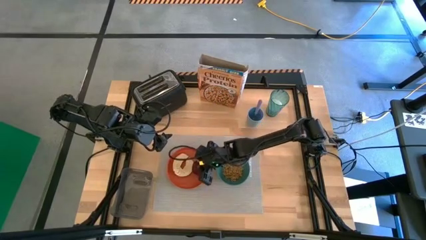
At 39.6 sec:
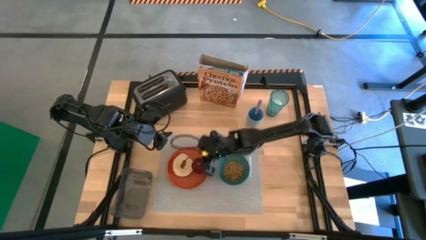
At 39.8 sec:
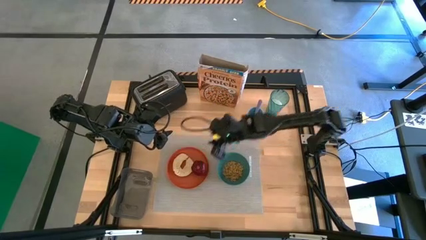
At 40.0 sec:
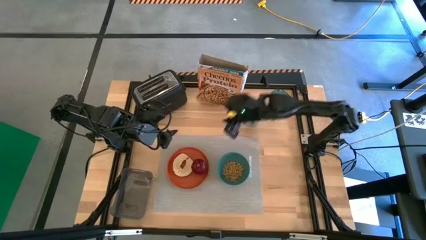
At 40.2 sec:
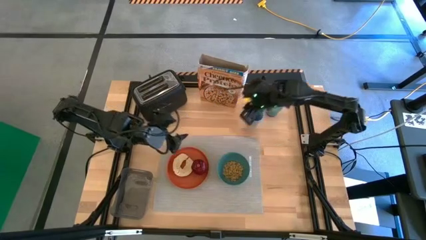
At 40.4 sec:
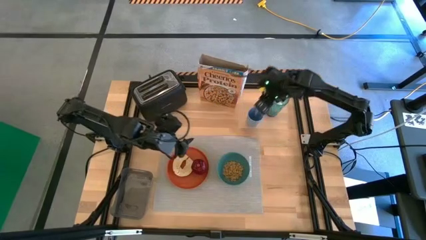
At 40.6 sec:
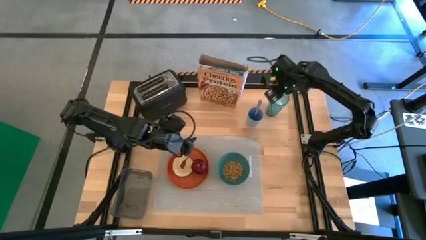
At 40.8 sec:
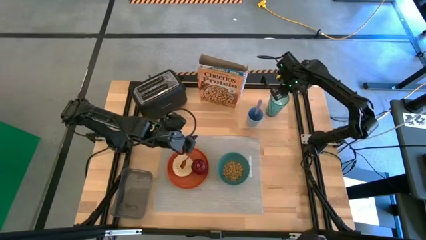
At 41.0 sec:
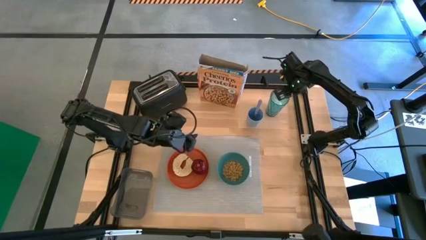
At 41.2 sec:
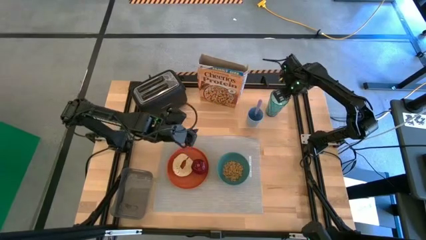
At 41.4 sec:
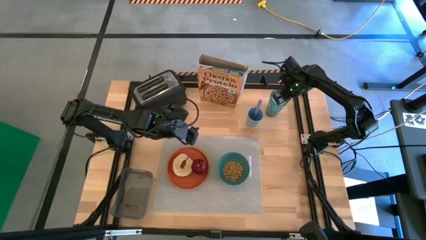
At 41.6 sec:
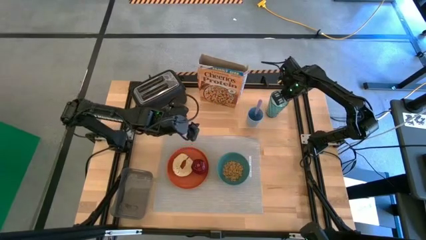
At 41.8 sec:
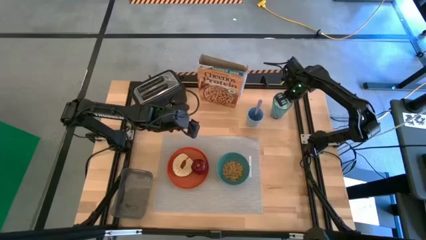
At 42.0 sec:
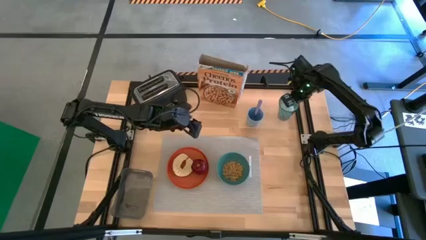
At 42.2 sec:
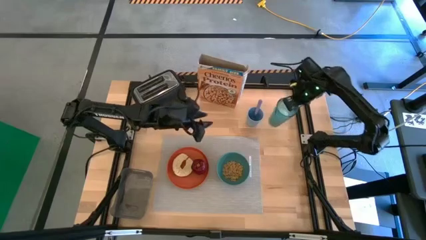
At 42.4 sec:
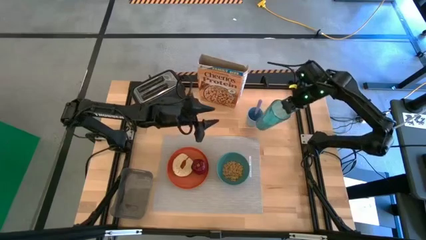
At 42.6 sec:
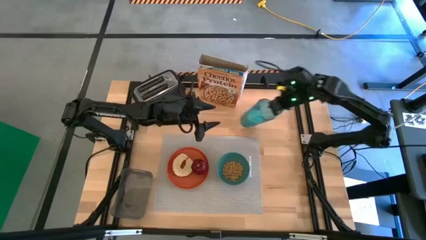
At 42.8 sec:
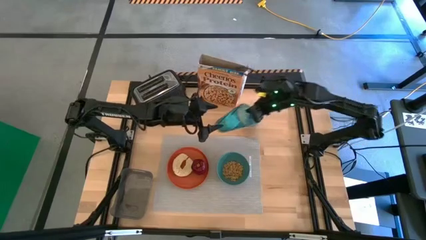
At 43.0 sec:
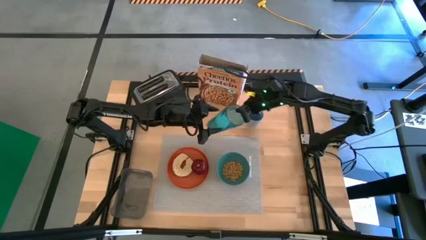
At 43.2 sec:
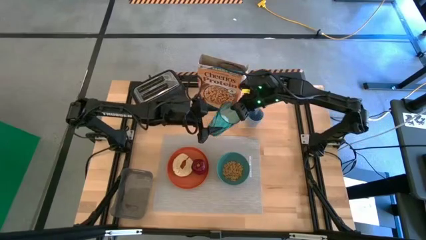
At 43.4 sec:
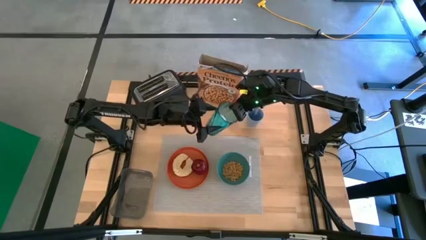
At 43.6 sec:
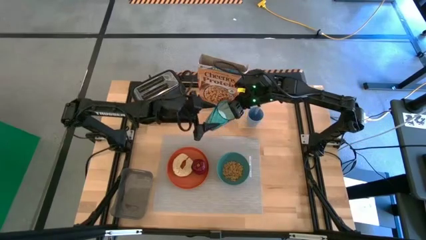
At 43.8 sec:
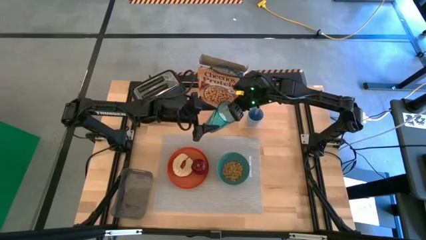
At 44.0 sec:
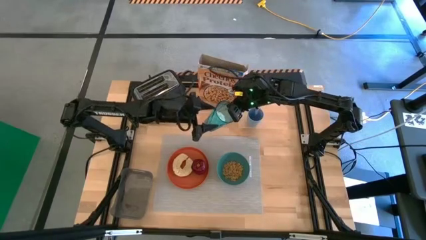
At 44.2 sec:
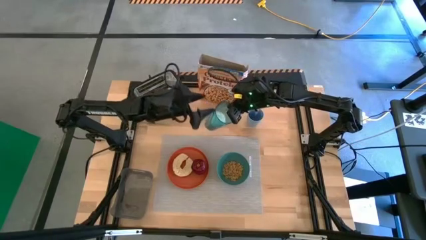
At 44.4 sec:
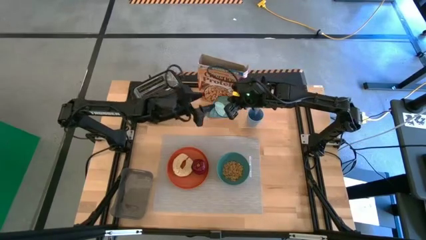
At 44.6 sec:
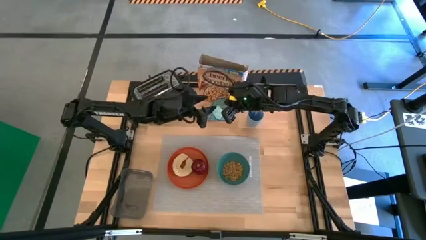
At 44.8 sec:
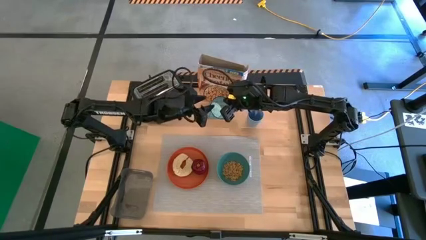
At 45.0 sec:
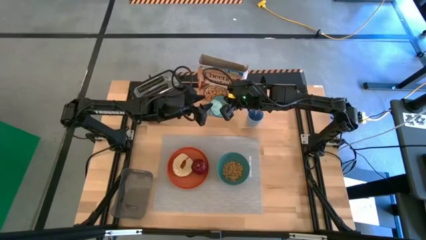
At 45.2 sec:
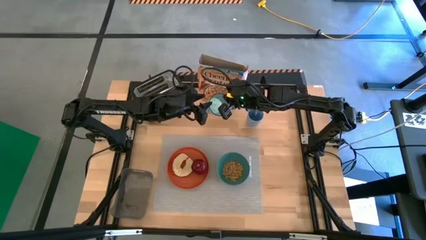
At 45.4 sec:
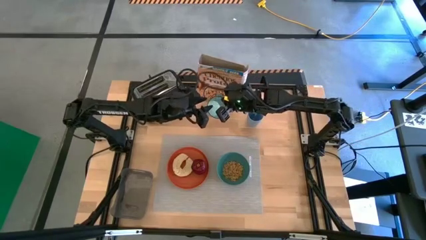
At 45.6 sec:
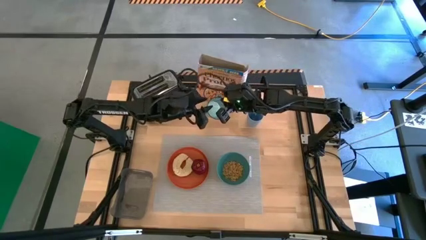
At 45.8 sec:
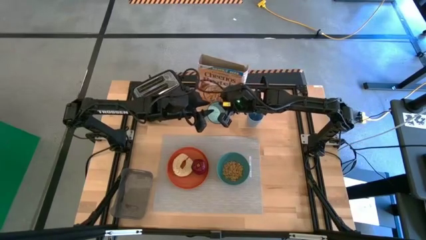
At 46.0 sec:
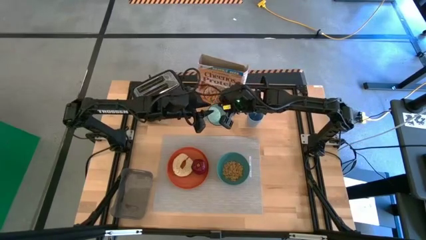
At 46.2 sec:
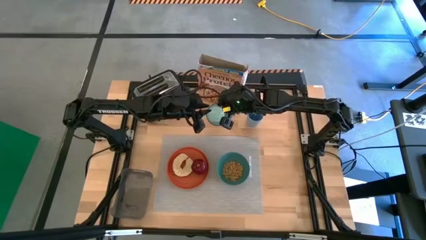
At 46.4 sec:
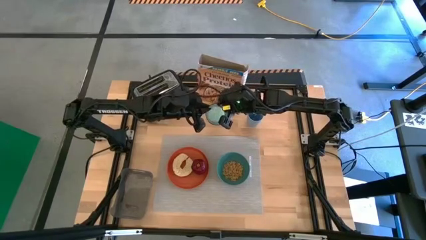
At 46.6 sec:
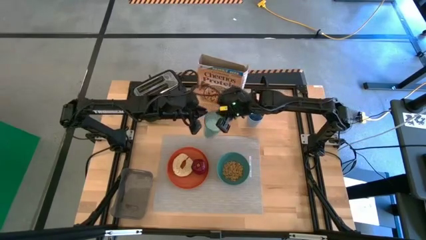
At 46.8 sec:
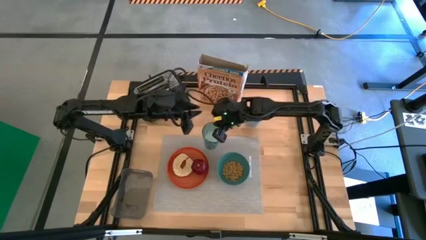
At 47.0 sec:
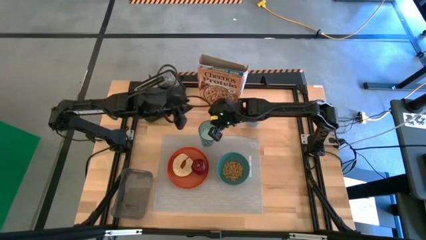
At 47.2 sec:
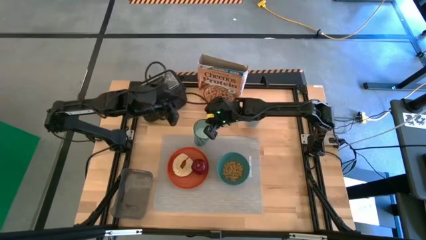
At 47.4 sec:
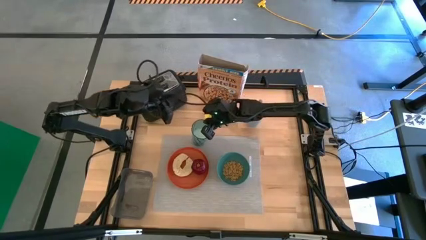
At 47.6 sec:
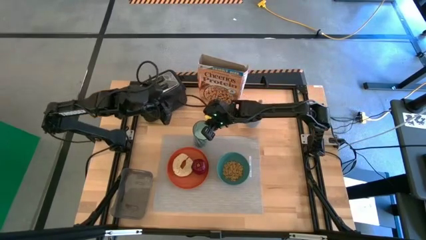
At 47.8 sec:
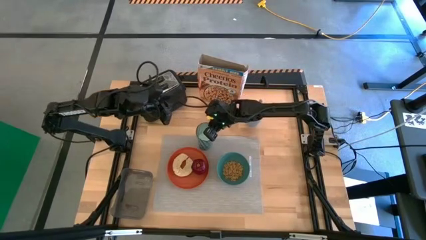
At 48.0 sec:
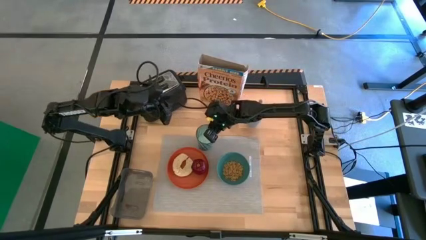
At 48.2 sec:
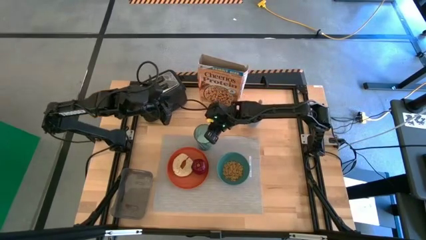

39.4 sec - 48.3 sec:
Task: Arrange a breakfast setting
Put the blue cup with rice on the gray placemat to the top right of the orange plate

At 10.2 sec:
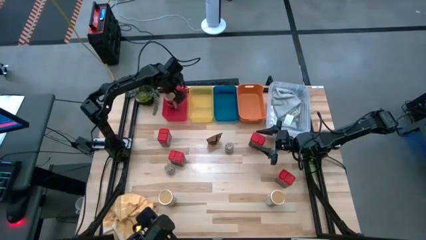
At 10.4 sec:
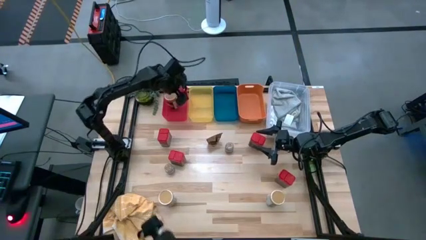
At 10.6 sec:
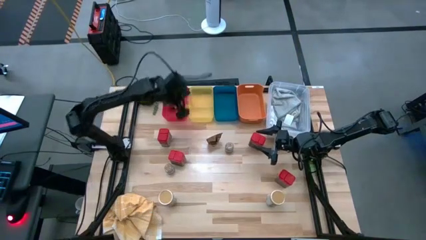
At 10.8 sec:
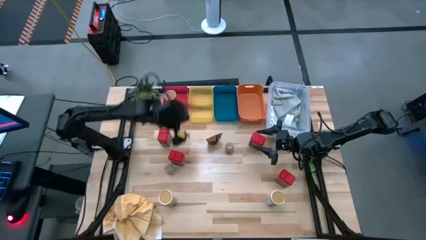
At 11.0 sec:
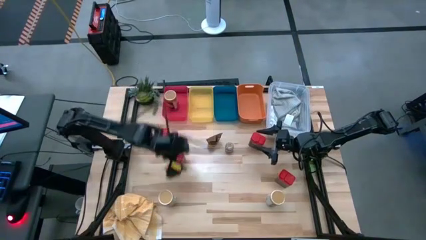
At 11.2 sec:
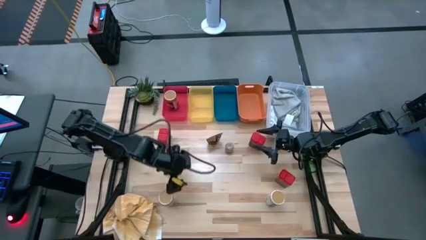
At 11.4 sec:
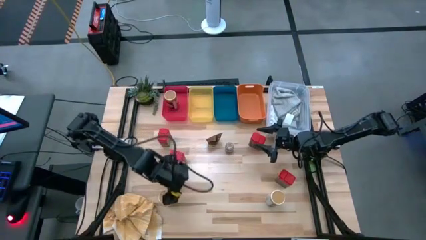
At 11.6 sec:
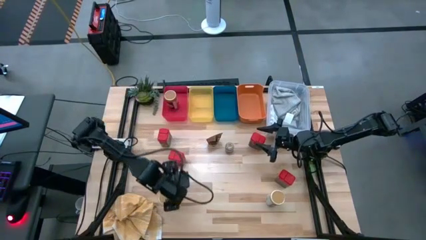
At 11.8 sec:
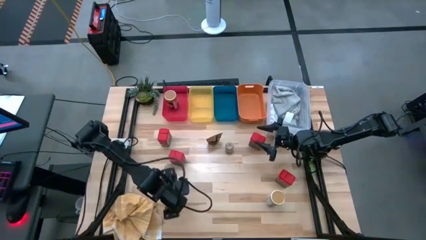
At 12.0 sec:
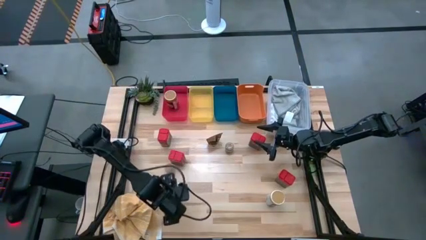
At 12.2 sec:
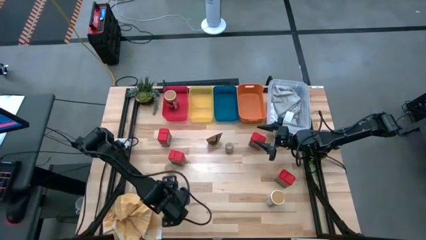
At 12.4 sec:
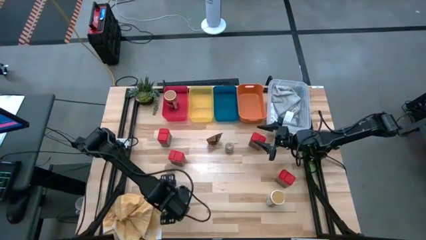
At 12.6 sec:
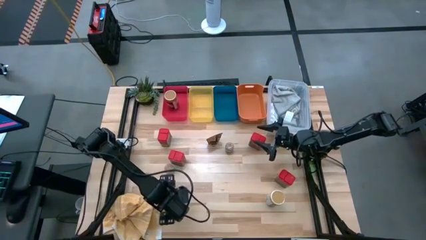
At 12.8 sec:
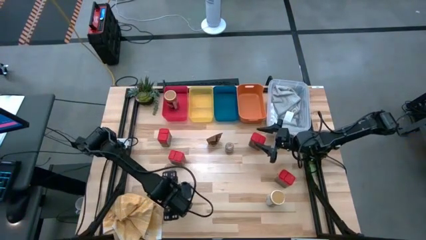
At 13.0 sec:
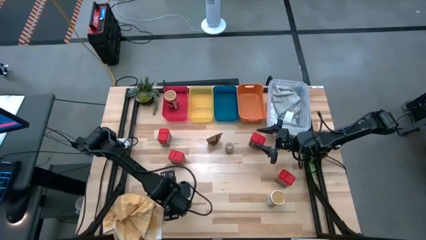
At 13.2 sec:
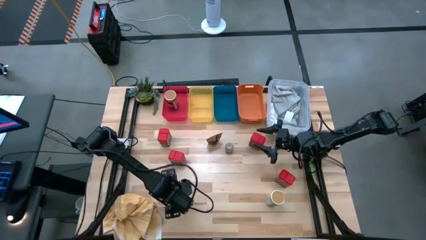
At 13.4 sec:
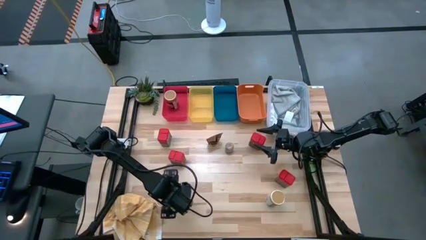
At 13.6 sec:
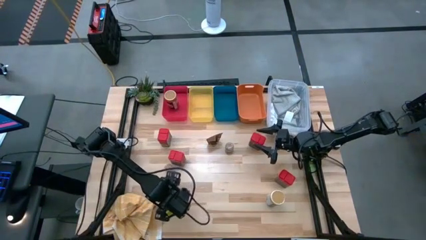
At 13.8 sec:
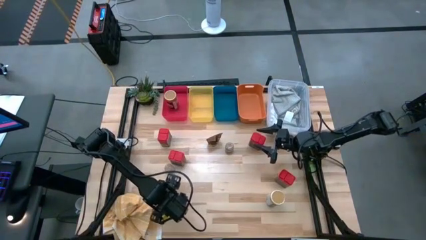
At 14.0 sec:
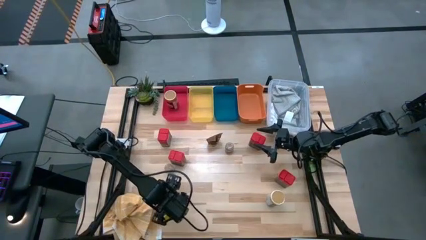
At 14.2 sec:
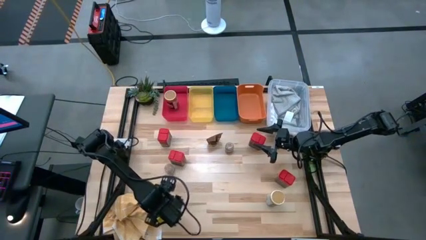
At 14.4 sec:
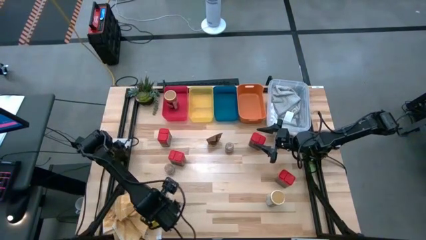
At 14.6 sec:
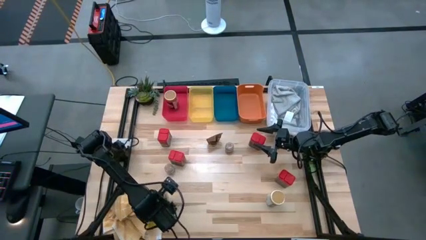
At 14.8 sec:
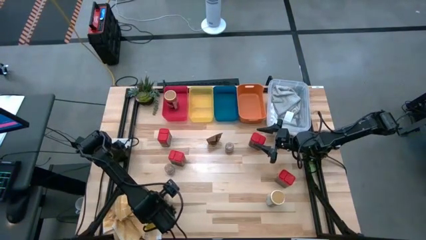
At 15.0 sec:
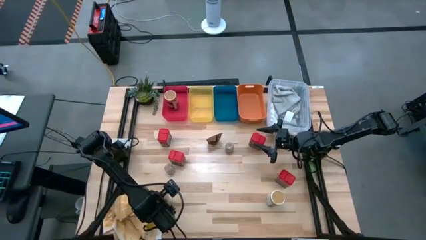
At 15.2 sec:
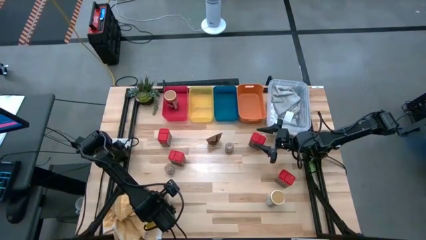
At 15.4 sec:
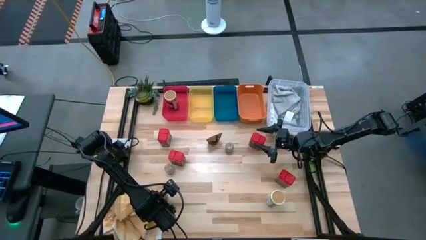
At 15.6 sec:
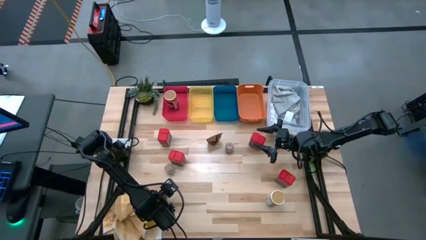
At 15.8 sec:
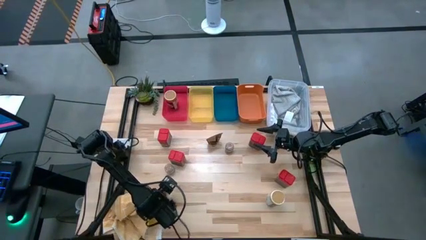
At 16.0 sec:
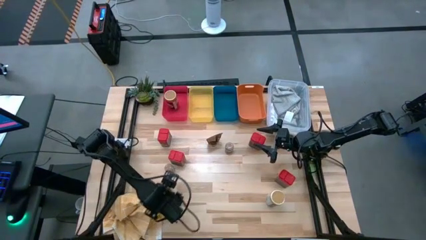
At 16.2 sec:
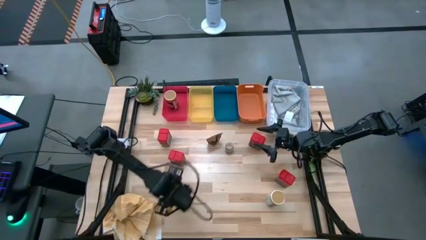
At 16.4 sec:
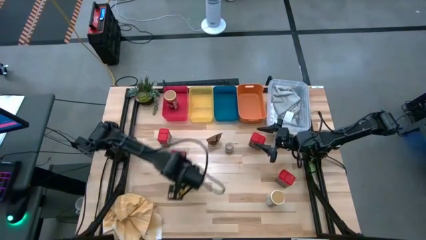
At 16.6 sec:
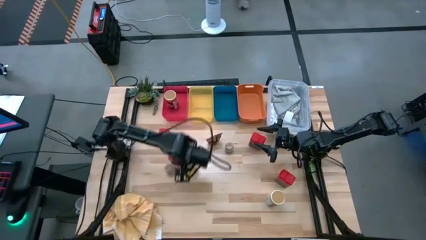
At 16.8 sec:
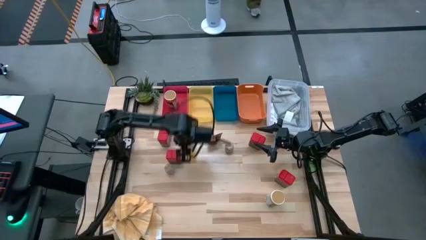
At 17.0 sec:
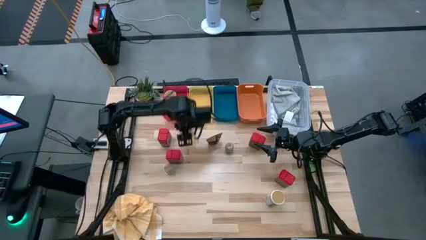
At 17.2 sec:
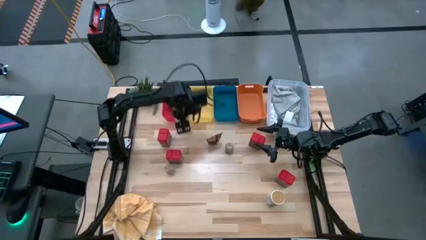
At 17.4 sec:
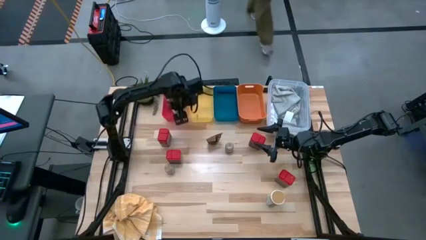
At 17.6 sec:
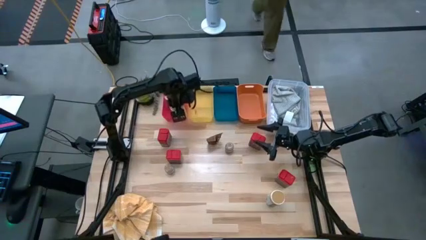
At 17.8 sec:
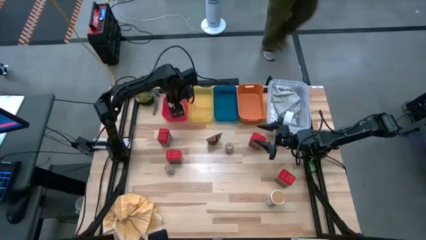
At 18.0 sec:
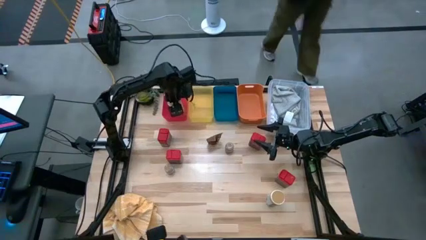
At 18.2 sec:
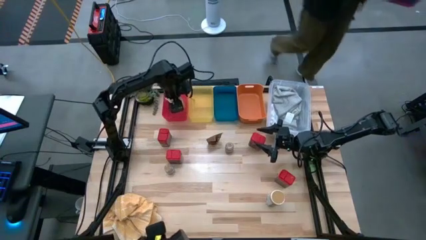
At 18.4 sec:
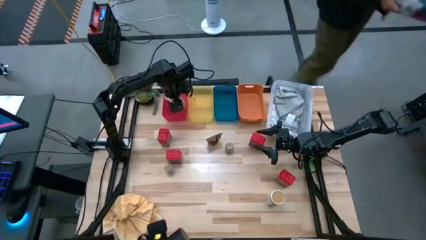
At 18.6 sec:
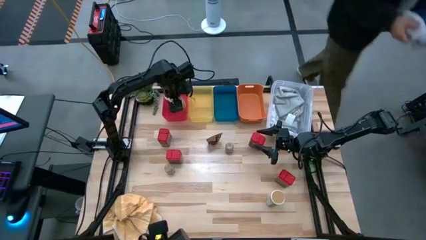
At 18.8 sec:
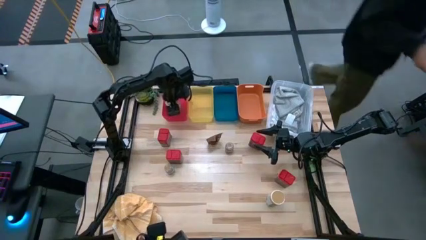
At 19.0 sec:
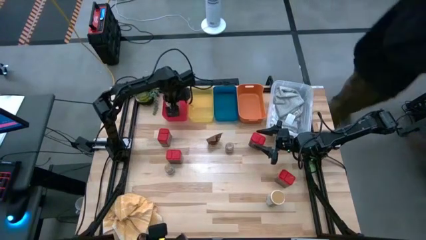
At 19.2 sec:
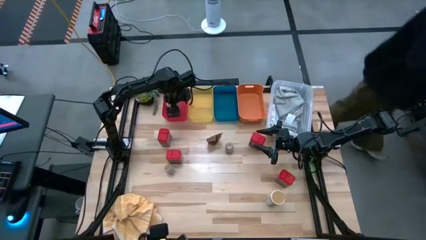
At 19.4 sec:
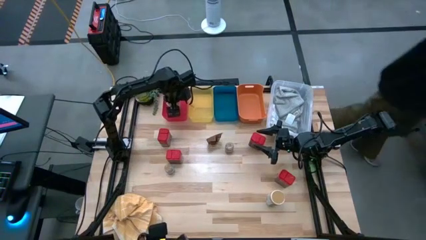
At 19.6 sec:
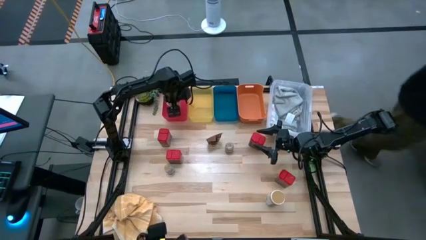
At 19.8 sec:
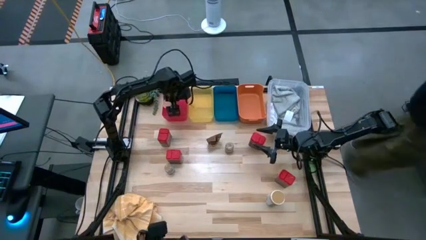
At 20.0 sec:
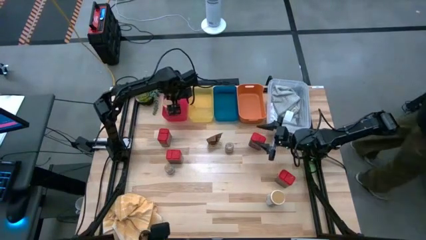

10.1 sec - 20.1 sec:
Task: Sort spices by type
Put the gold spice bottle into the red bin
